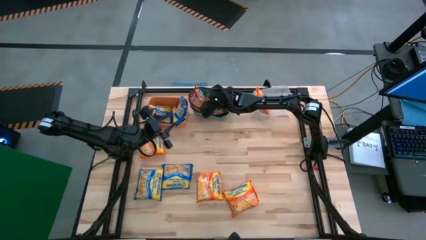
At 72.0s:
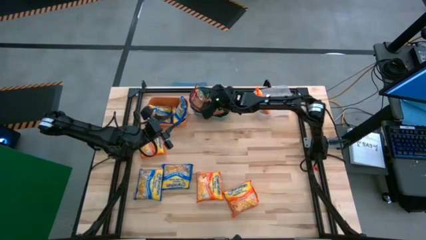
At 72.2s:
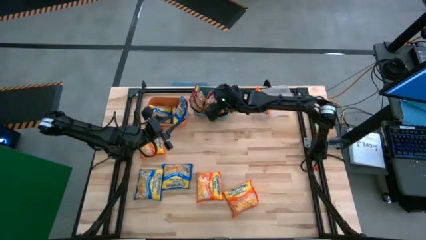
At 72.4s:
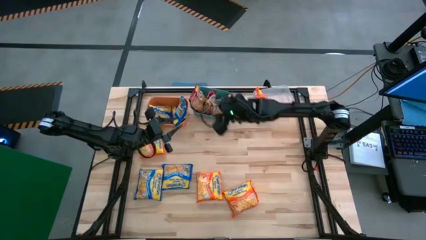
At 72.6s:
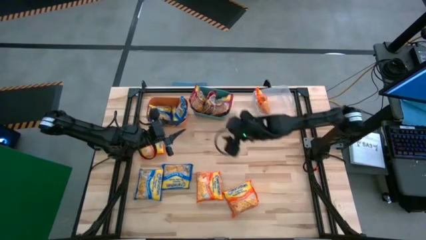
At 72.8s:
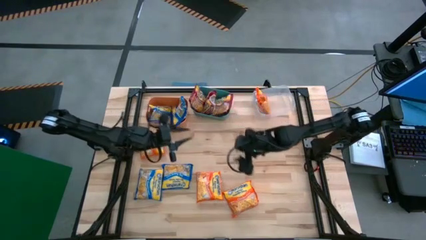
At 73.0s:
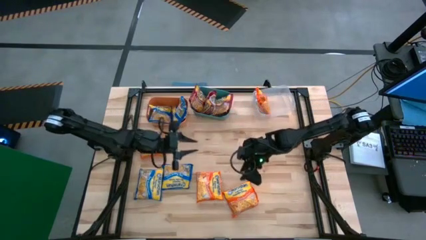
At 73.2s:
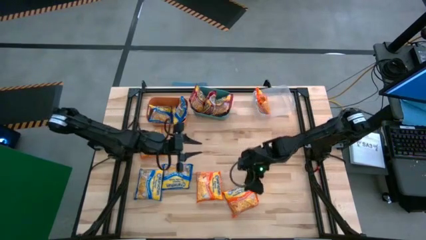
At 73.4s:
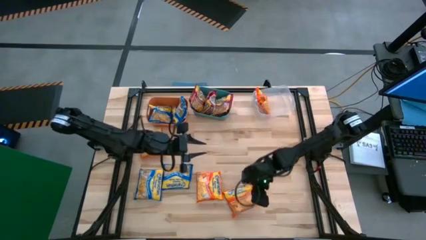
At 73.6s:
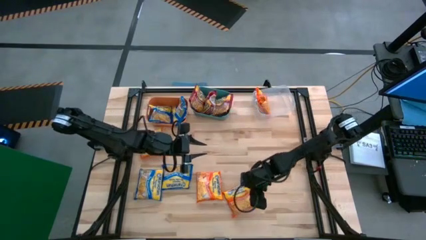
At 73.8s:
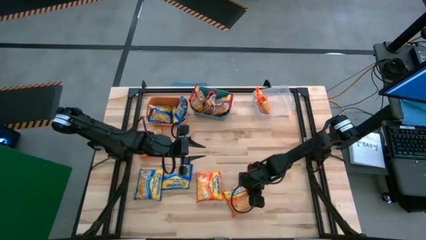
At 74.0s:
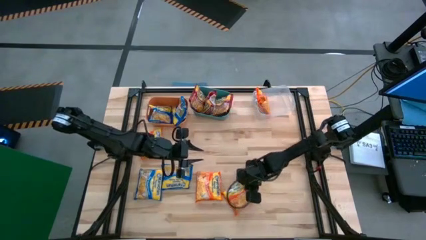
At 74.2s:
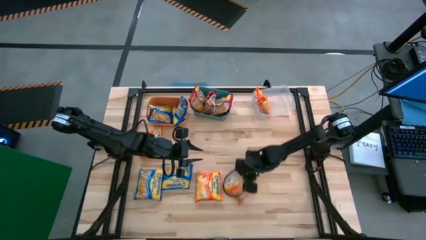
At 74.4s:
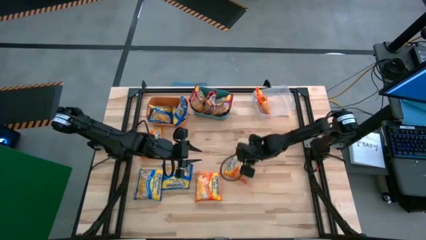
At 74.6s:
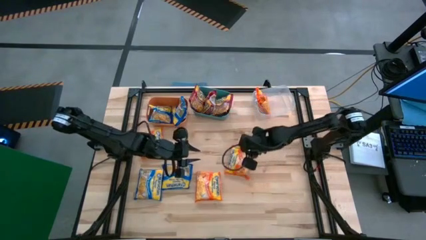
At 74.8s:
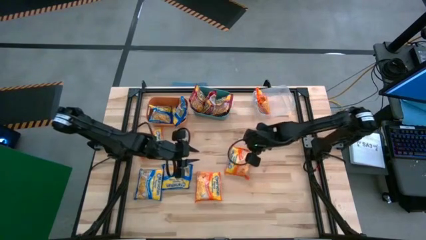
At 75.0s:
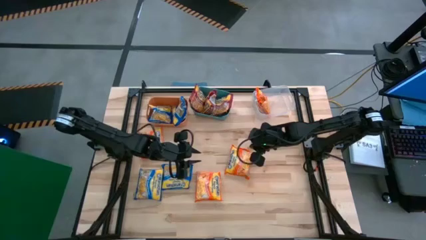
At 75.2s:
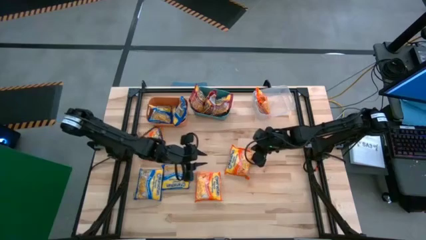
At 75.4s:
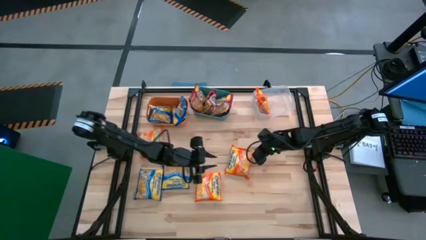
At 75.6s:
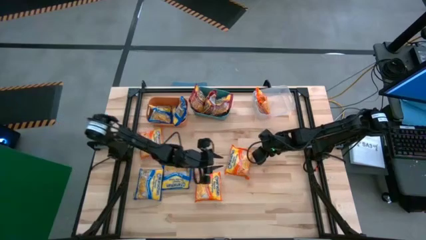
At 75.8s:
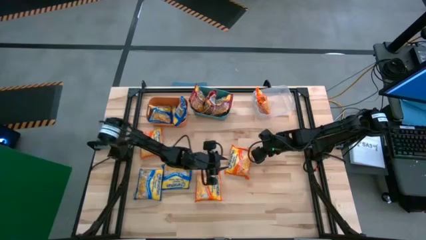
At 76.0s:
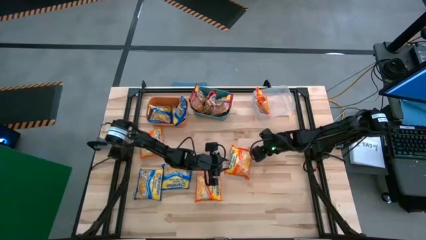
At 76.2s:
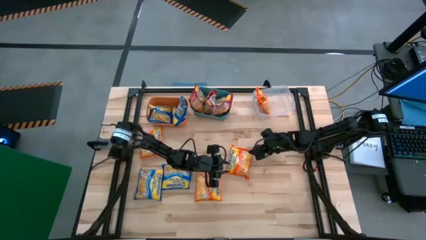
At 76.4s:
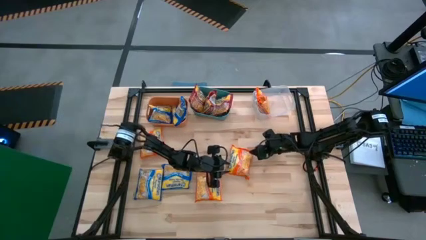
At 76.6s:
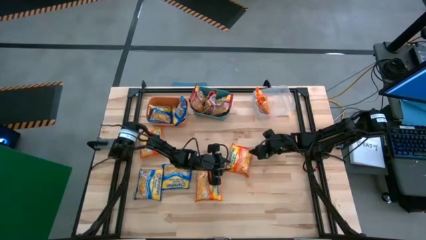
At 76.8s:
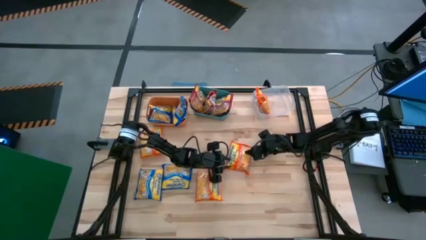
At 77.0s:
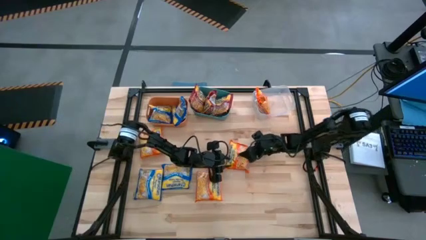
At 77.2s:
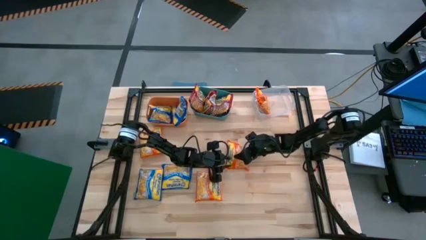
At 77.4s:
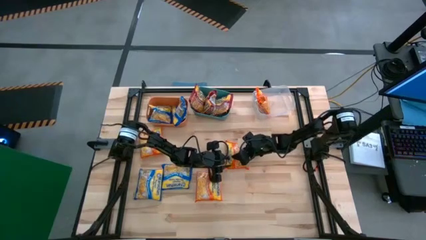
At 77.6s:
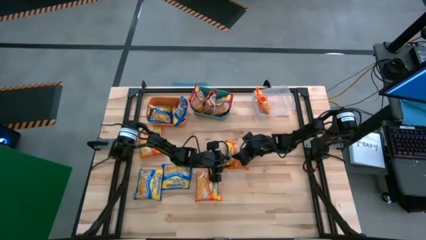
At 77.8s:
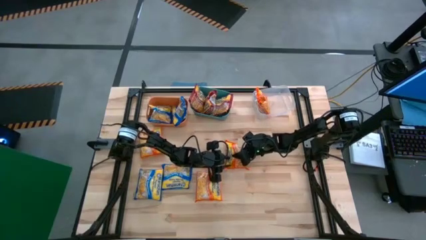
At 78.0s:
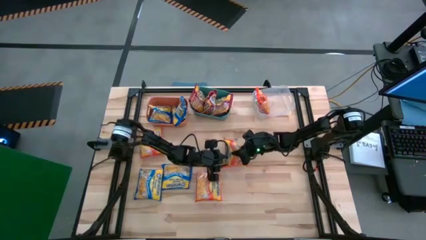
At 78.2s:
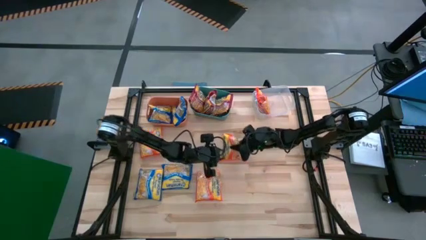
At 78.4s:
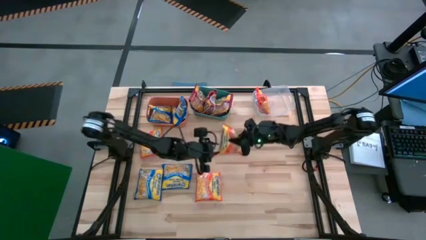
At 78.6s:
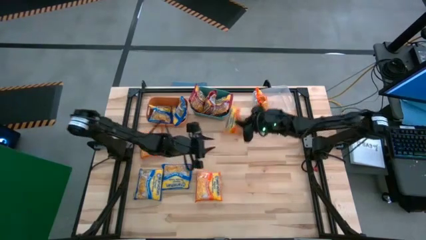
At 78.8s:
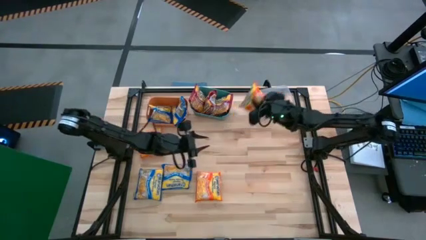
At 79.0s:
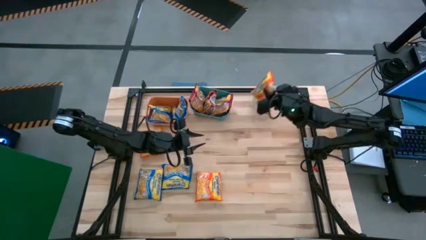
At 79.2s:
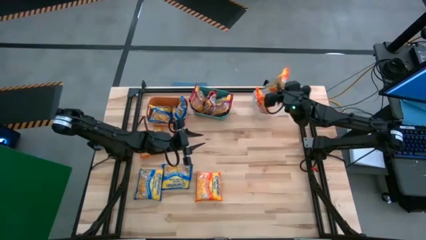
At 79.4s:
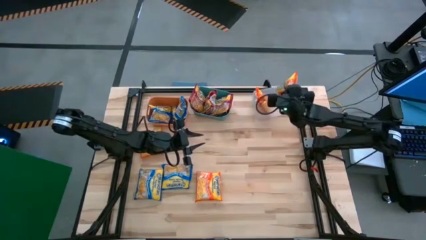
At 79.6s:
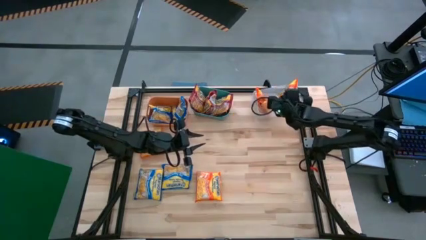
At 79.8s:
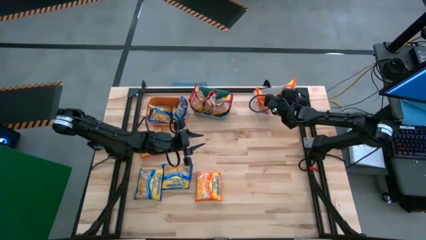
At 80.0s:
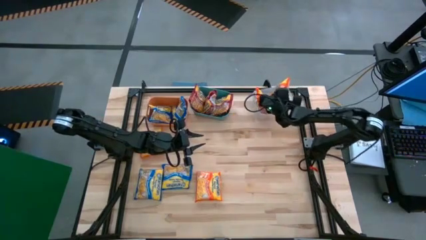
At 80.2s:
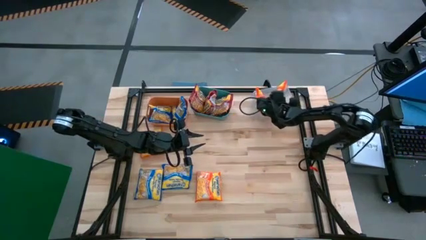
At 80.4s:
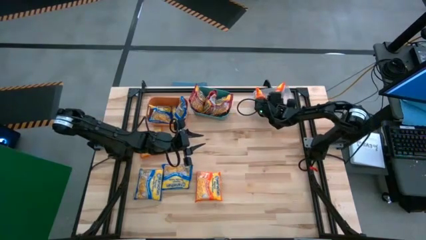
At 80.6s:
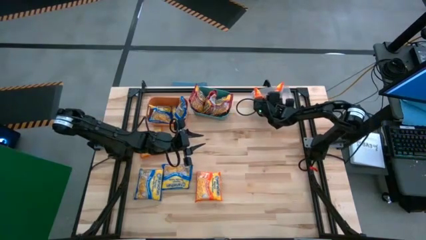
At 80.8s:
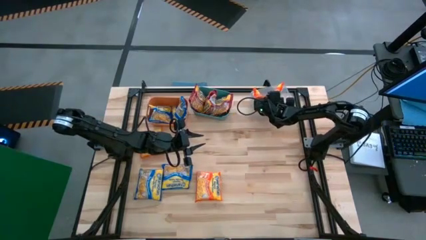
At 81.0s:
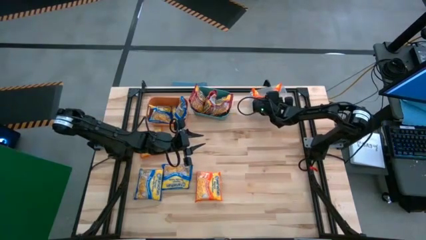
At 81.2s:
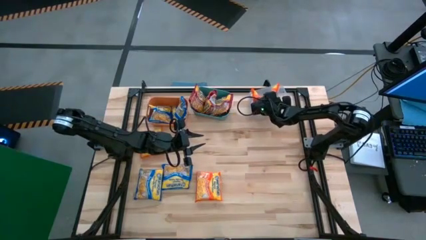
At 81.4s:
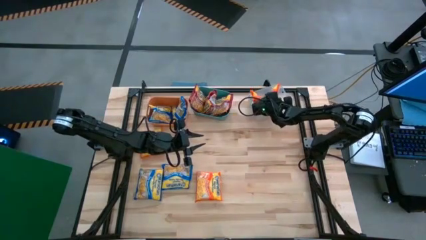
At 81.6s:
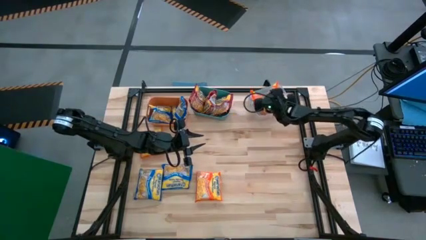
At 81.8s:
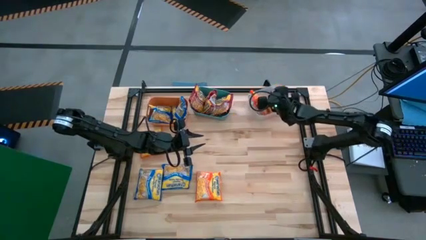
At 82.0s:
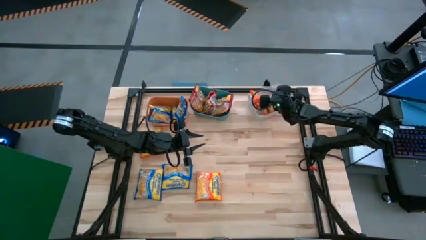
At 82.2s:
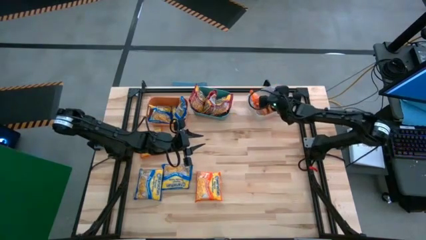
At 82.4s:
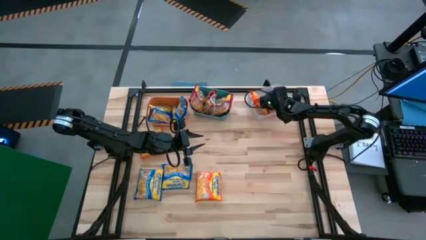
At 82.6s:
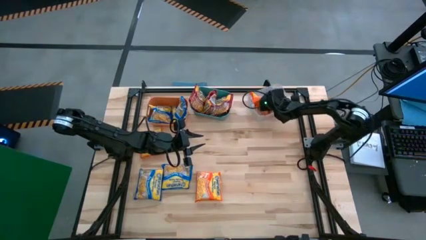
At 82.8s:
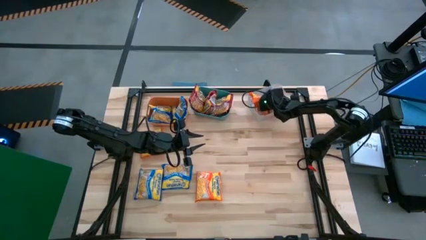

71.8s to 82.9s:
Task: Sort Maruchan noodles
Put the orange noodle pack into the transparent bin

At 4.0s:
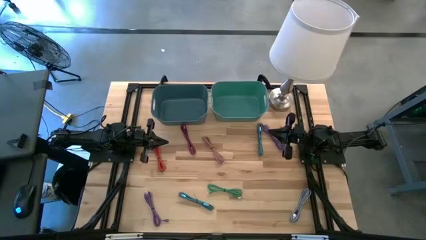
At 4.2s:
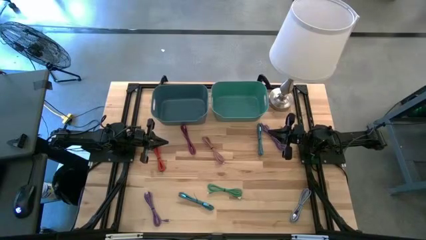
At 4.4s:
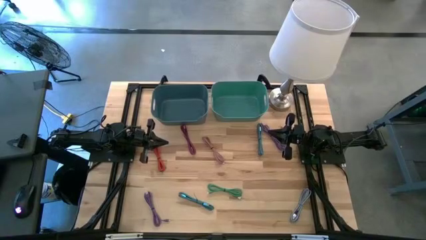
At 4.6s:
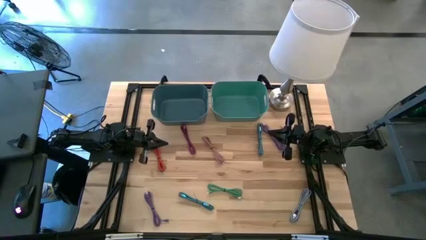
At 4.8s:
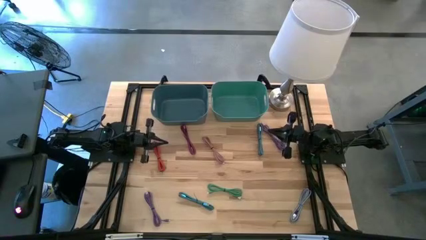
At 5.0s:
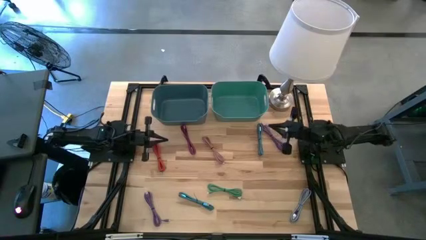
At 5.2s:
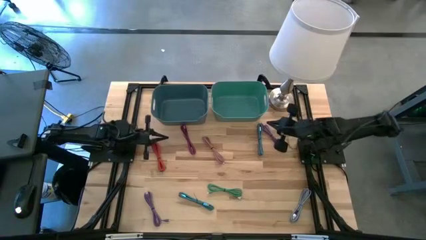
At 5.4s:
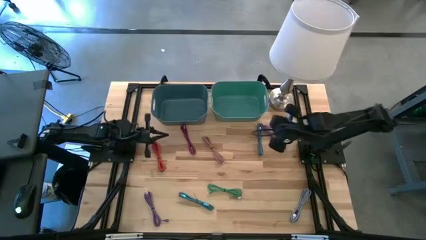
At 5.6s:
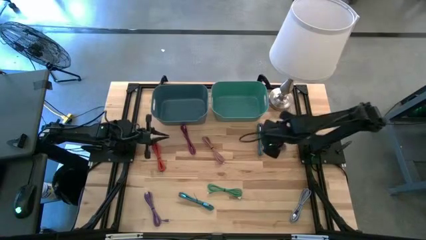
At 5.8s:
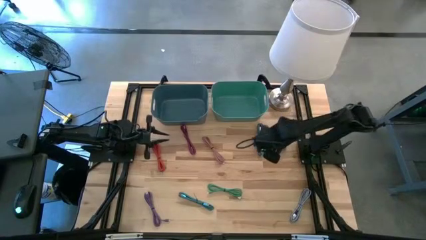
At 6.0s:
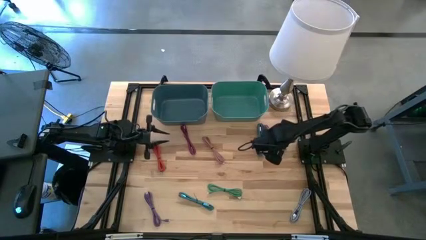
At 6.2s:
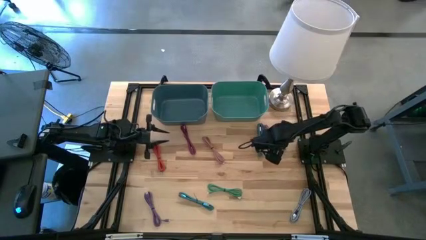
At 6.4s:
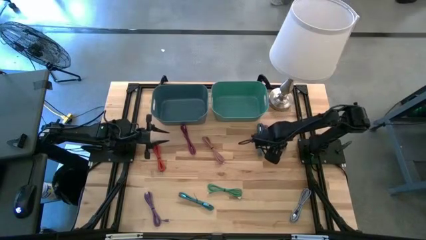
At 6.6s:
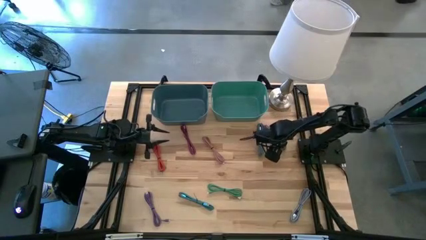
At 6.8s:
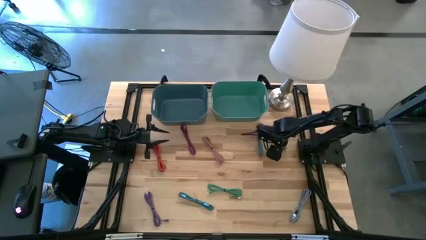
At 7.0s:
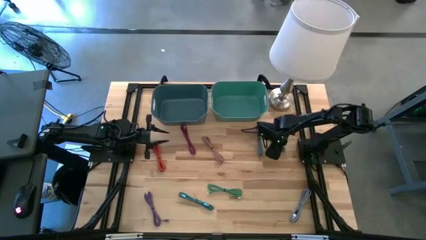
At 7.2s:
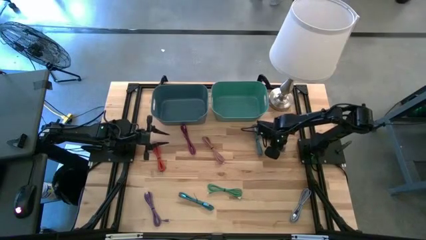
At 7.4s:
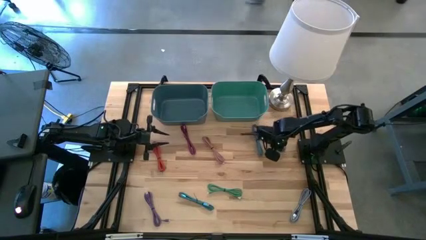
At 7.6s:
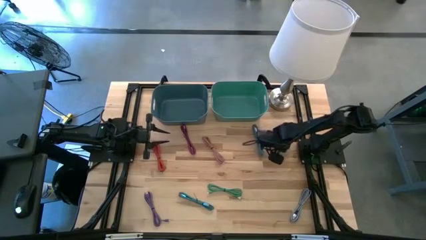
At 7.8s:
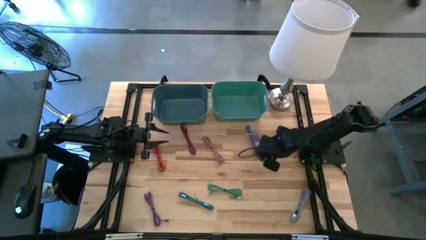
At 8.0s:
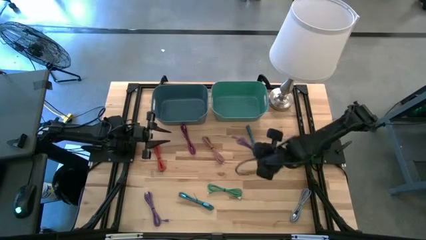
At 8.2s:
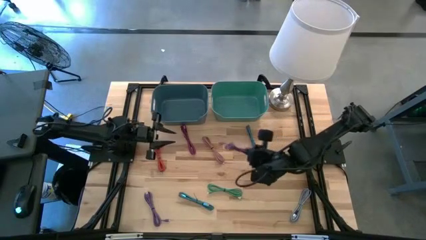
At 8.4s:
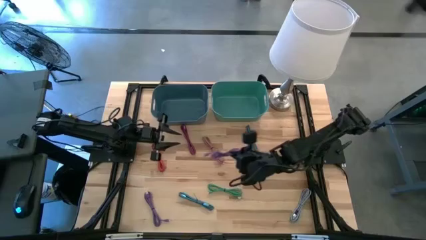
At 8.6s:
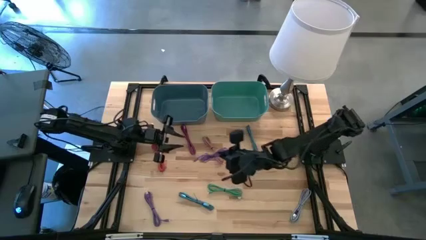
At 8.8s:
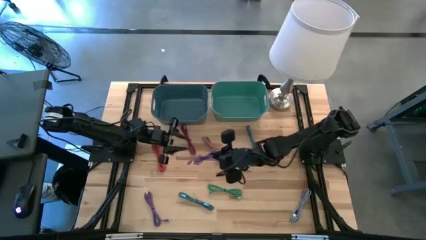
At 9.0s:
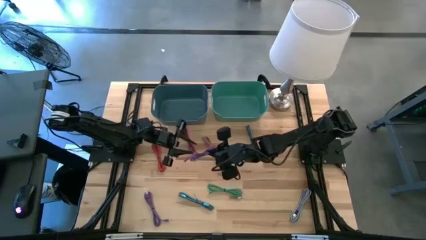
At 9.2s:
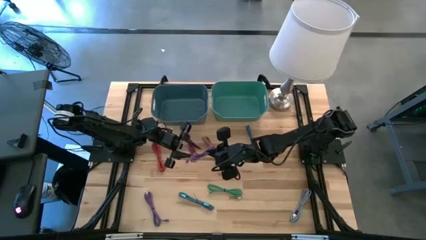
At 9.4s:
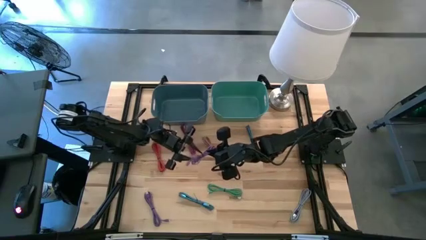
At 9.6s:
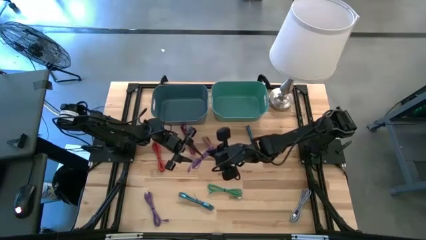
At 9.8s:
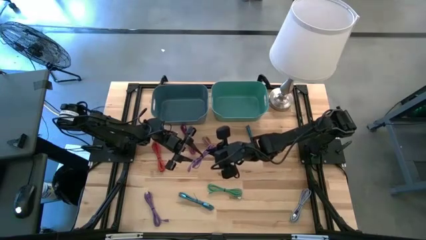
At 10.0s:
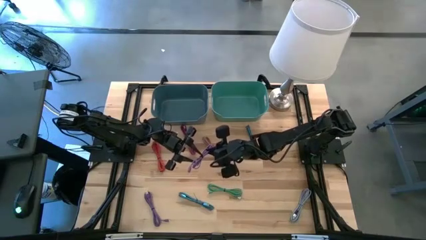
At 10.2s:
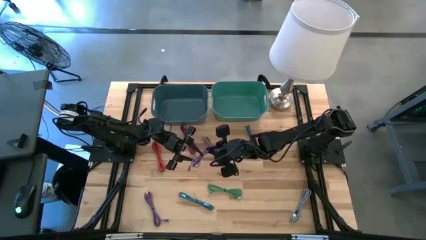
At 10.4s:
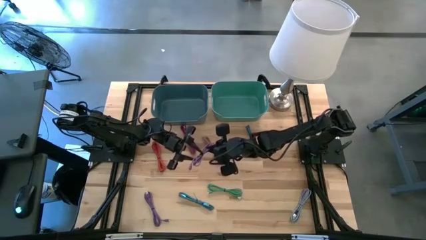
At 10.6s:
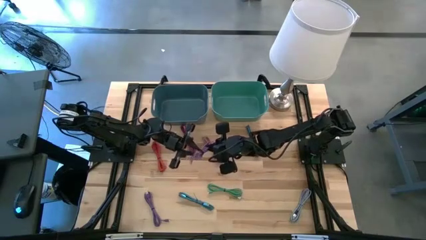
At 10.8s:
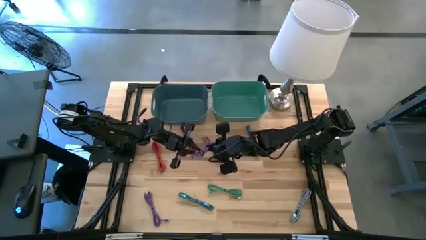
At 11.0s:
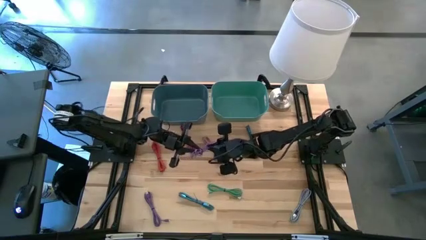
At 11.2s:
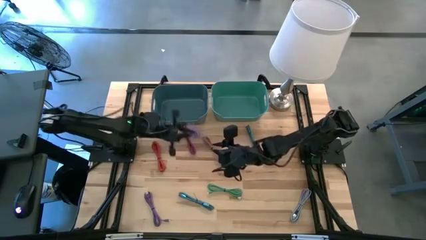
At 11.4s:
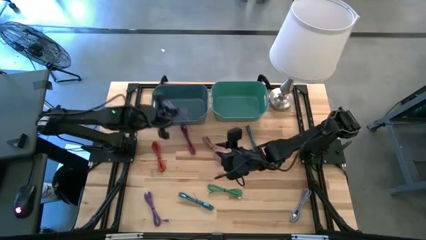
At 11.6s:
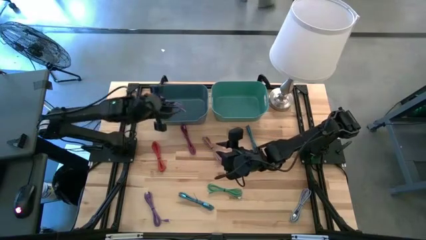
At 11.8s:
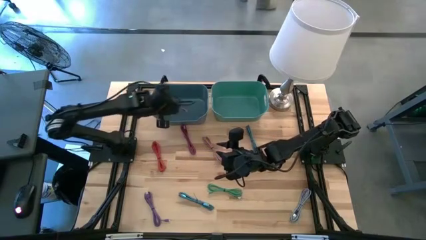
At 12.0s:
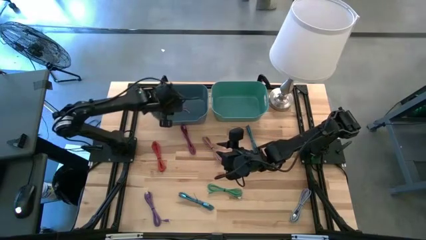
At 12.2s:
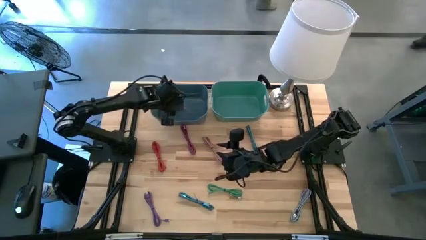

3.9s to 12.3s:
Task: Pick & Place USB Port
Put the top purple usb cable into the blue bin
